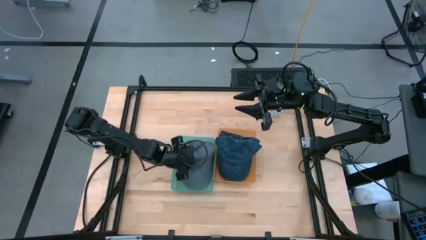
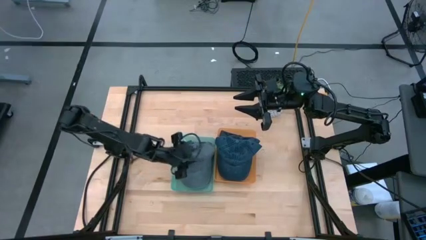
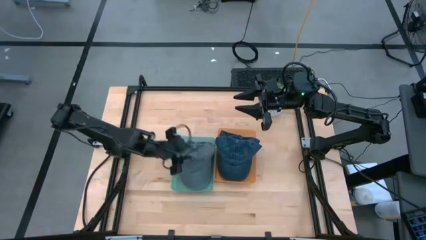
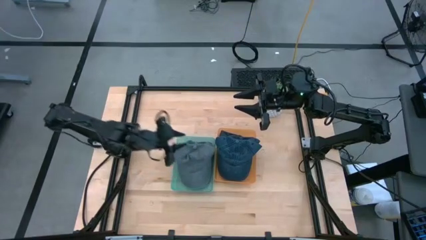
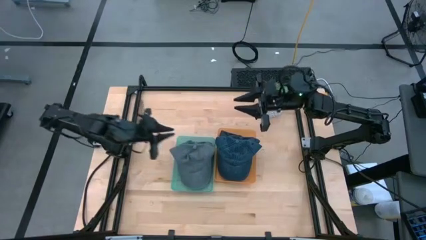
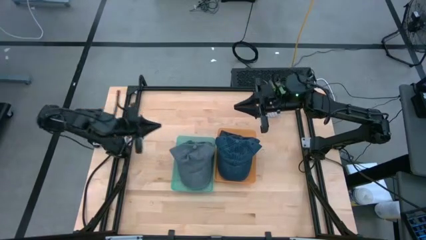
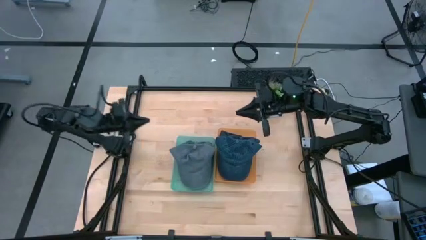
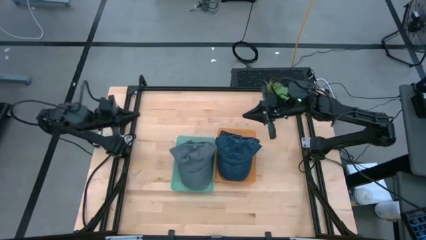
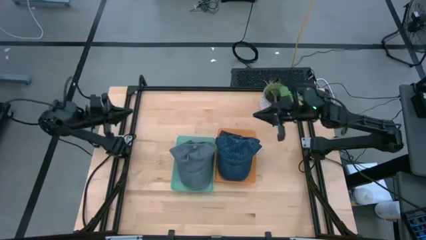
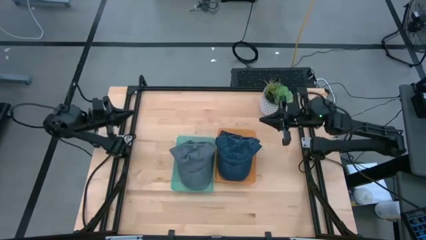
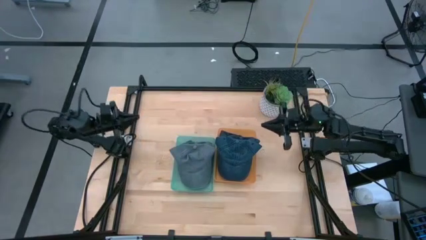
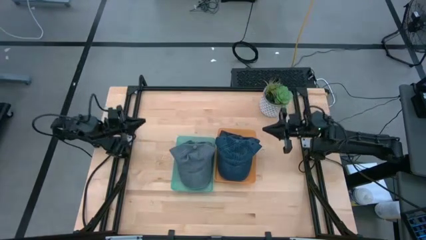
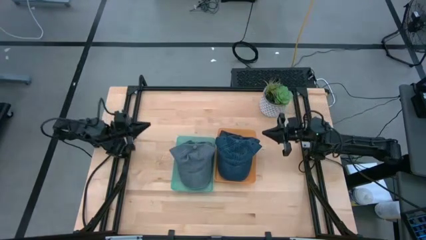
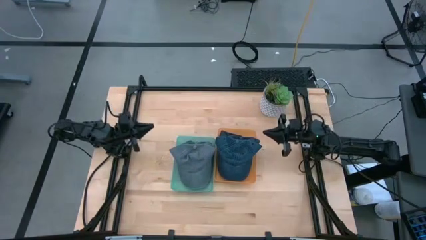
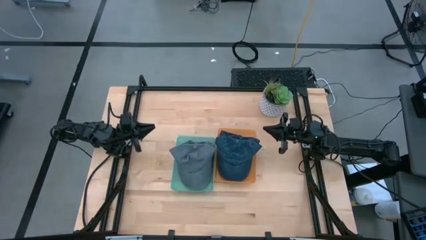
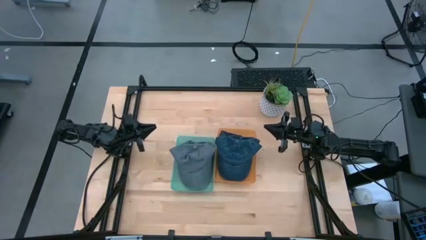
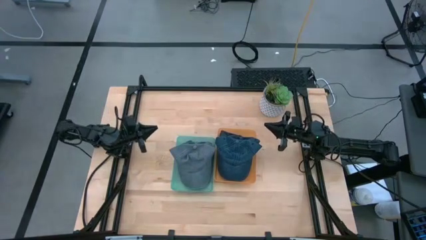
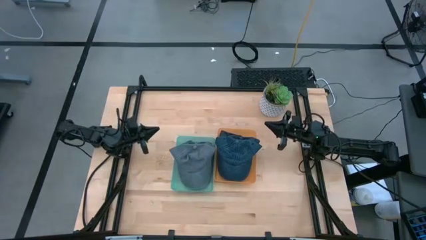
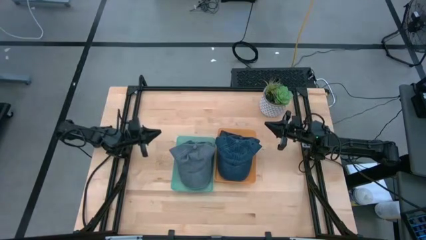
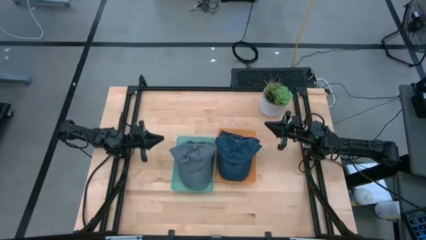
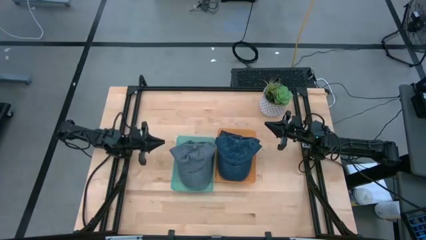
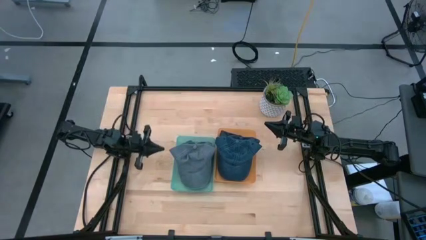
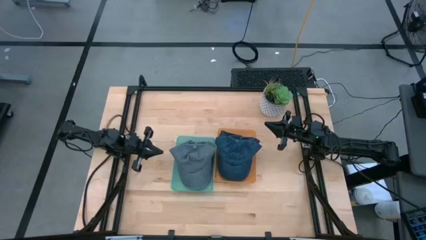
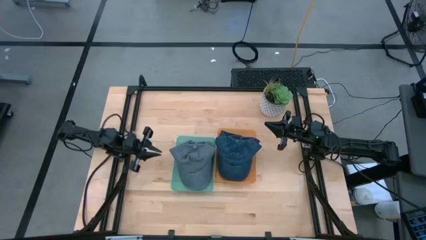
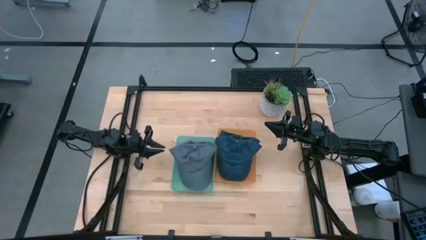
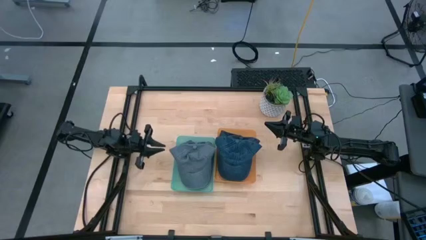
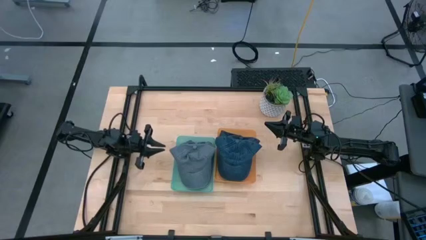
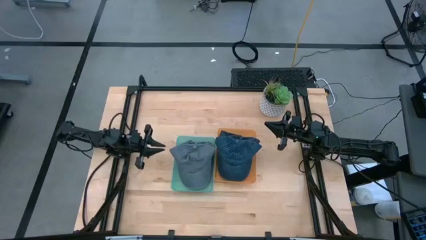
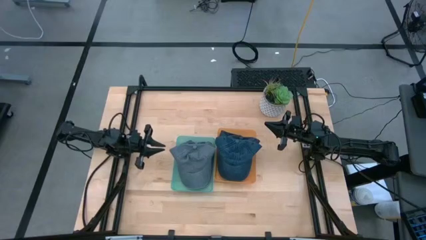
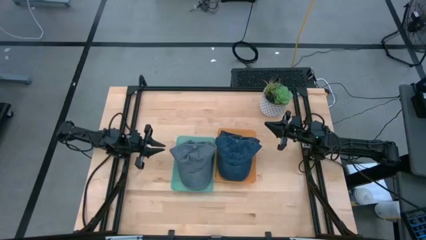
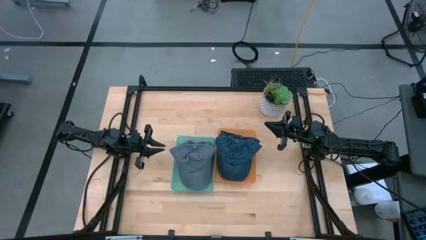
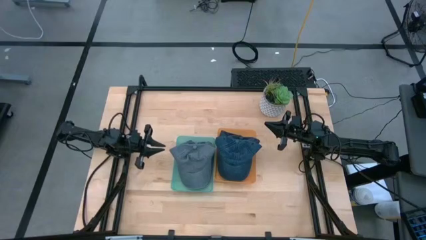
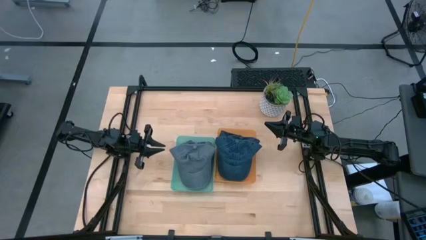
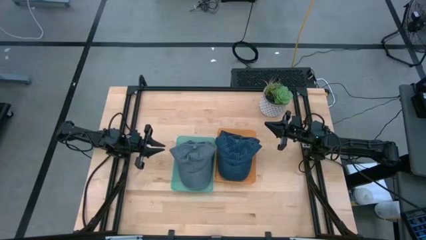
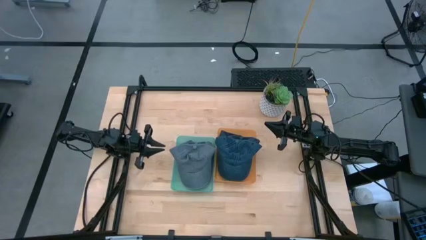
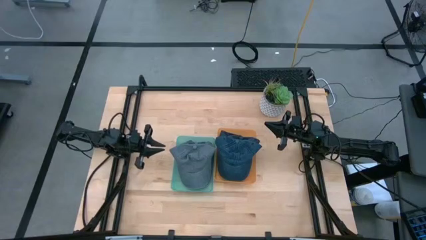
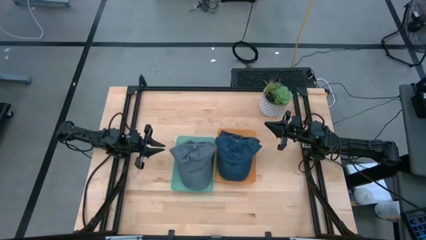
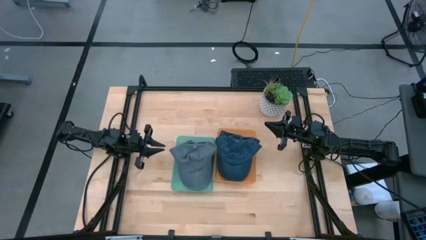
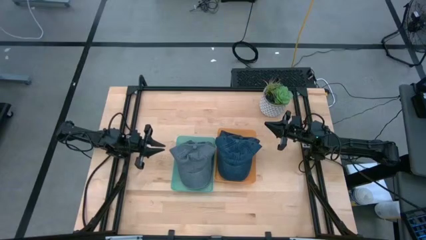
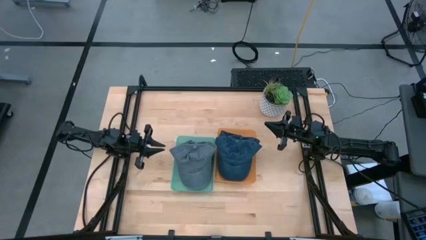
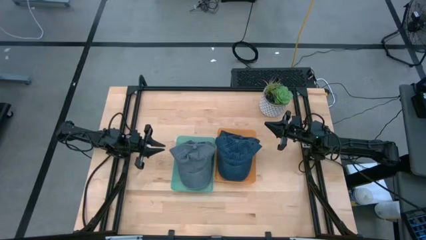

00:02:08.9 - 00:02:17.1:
Task: Pick & Place hat
Return to Home Position

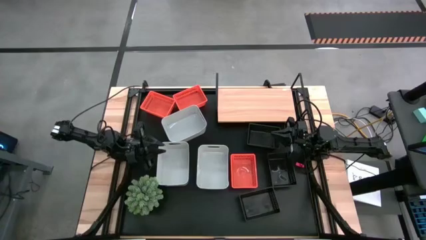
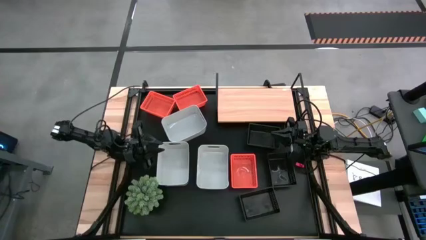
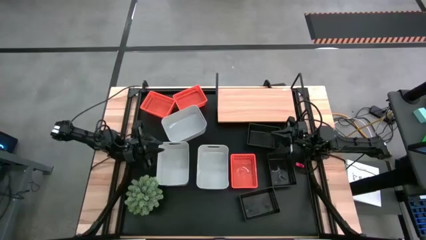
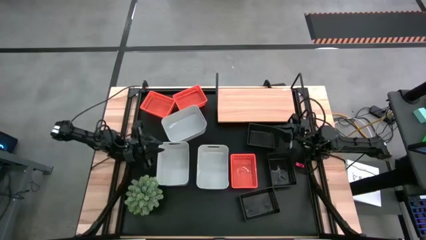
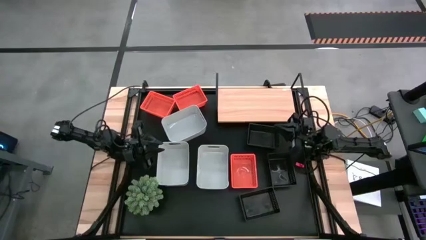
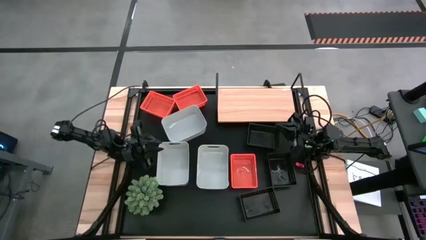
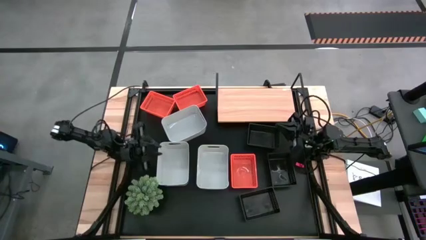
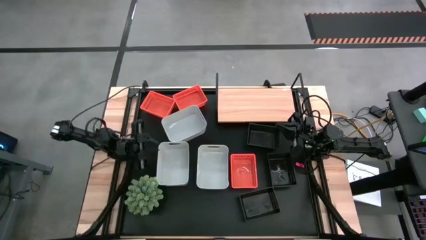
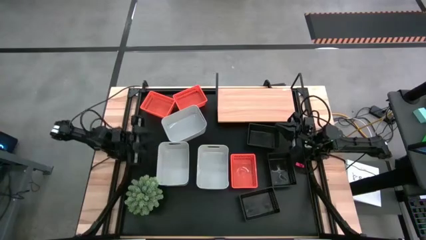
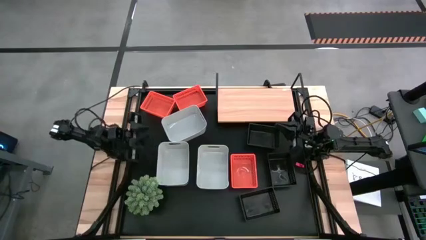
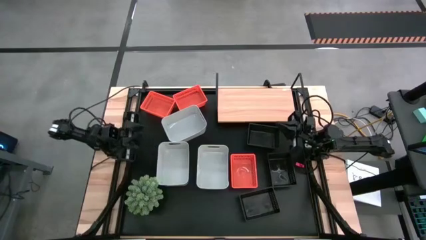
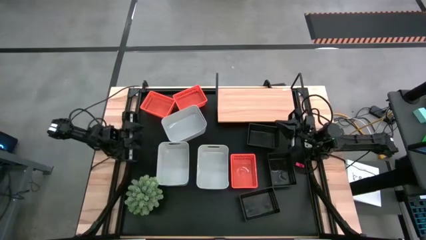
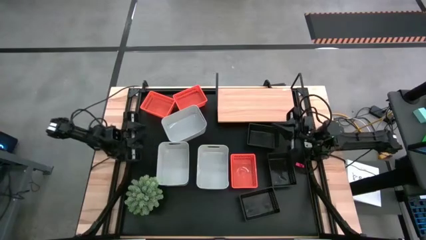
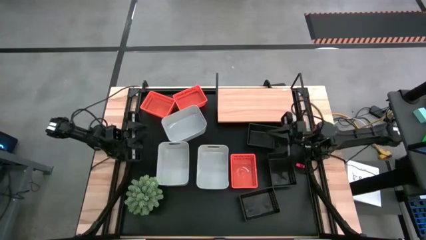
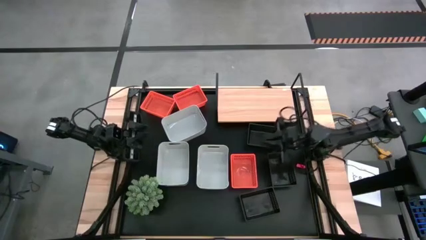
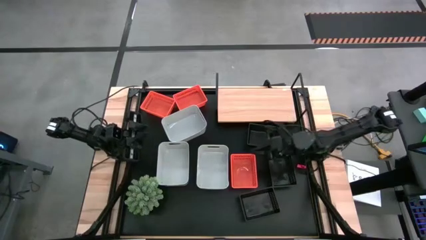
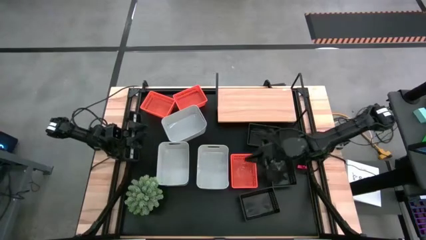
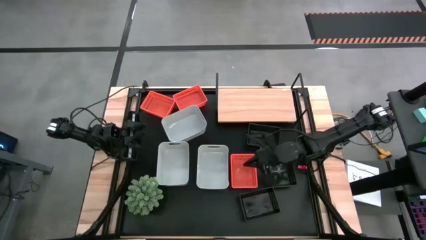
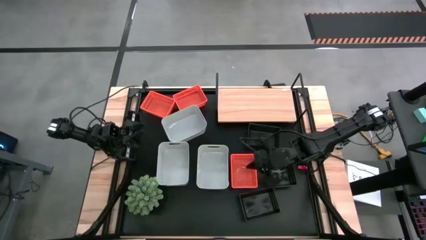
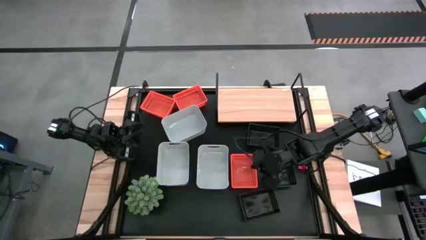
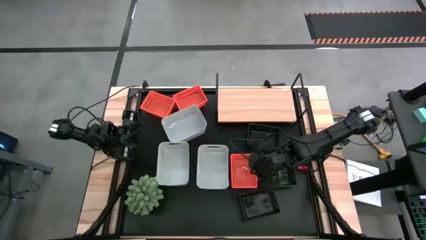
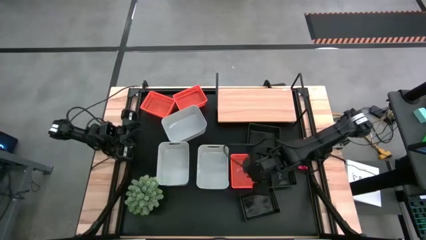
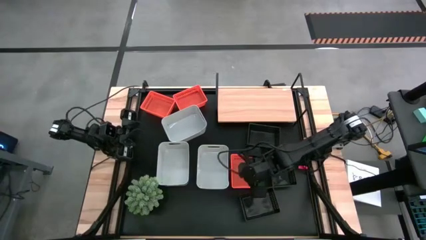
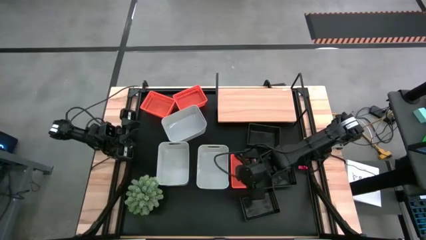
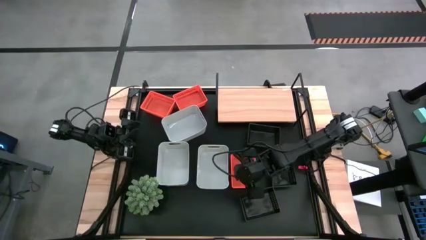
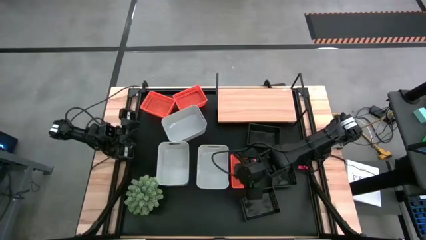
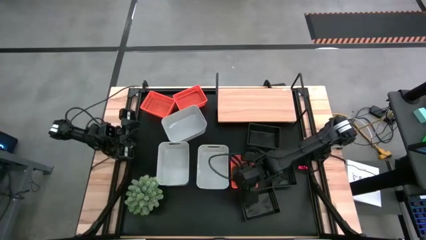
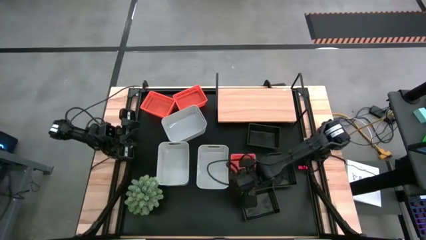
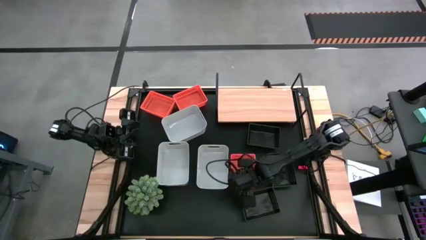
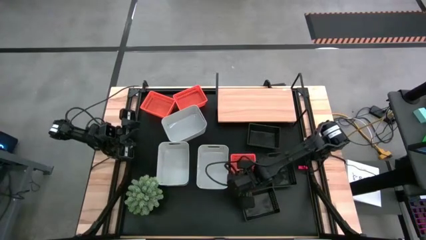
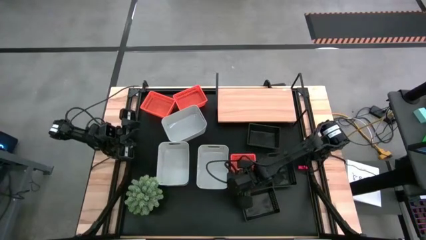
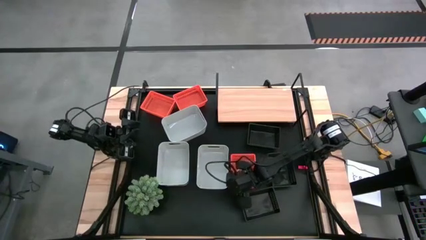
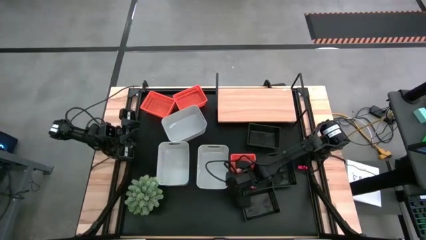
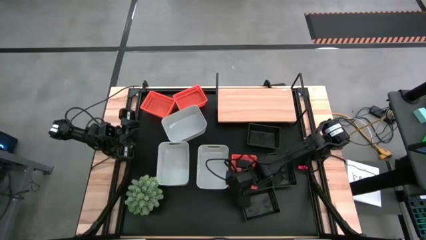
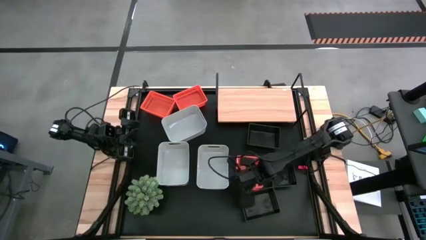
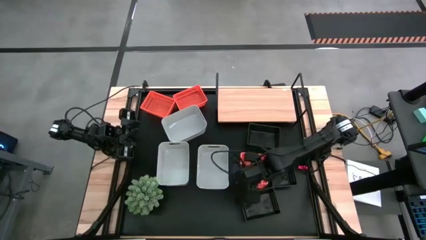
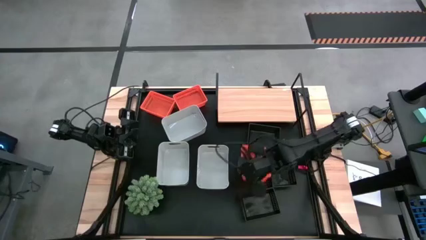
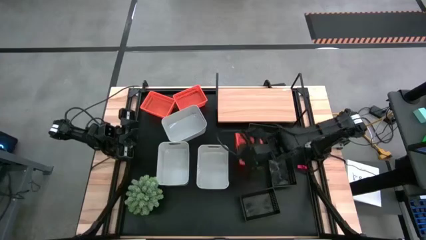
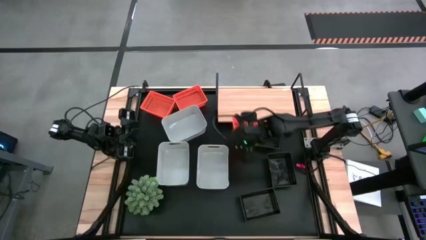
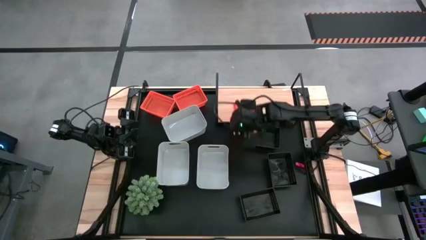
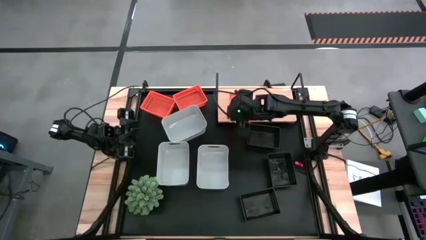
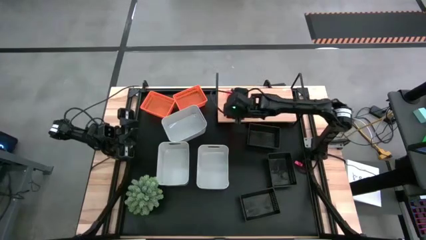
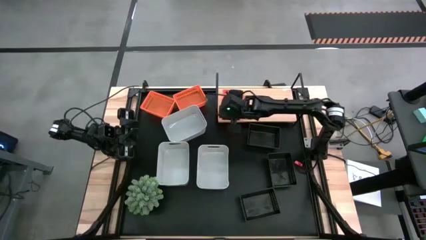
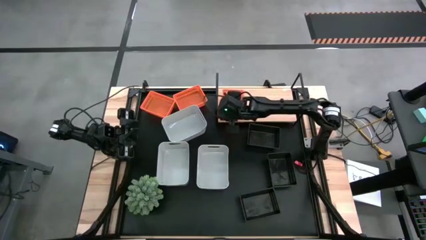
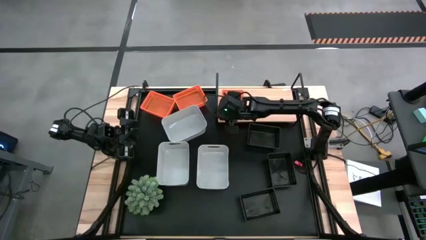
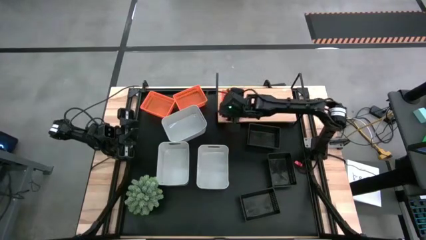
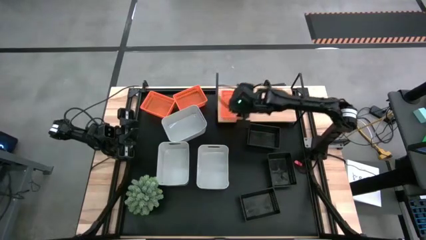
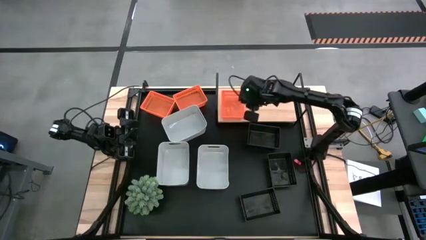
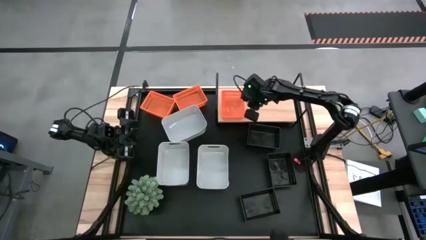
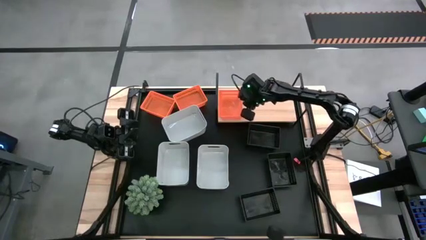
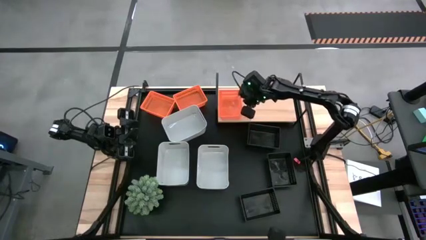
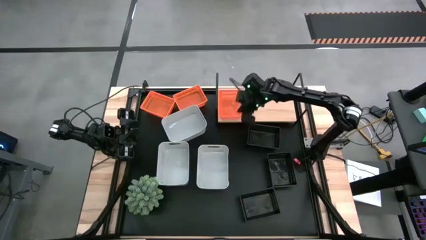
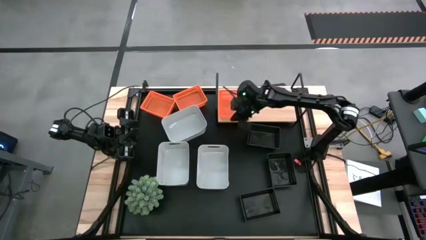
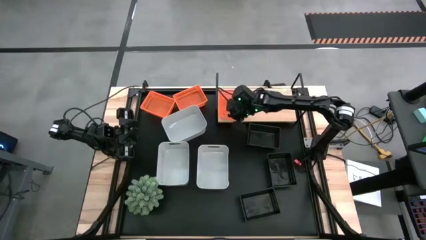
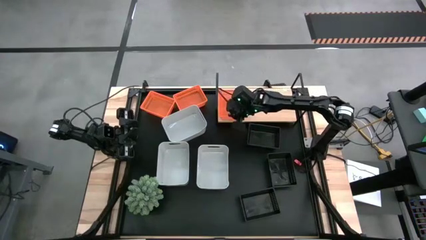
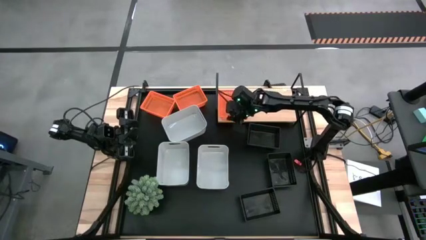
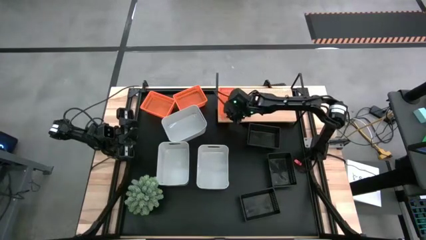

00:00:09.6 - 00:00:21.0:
Task: Stack baskets on shelf by color
Put the bottom orange bin on the shelf
